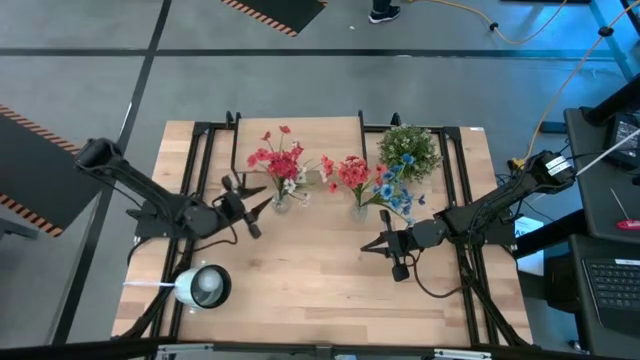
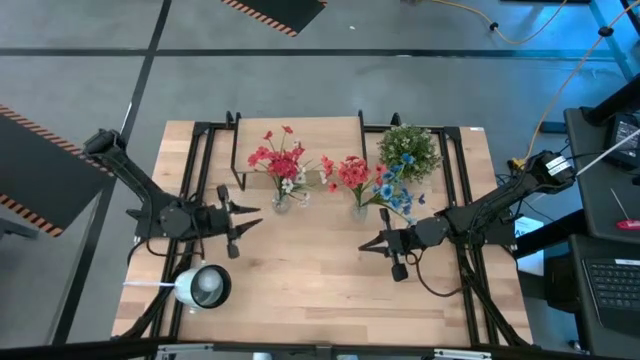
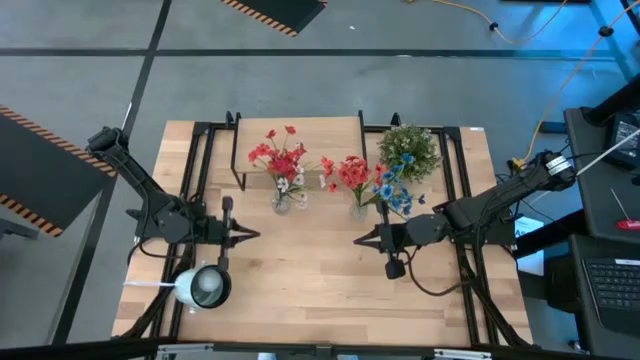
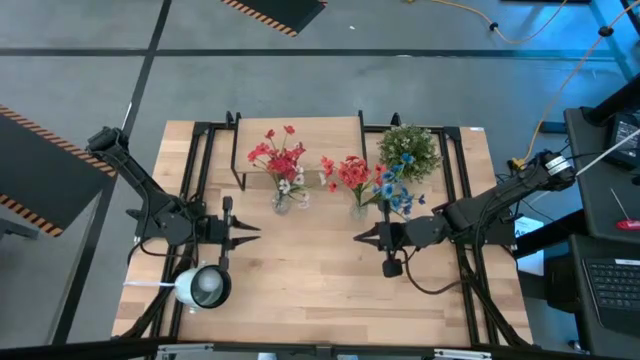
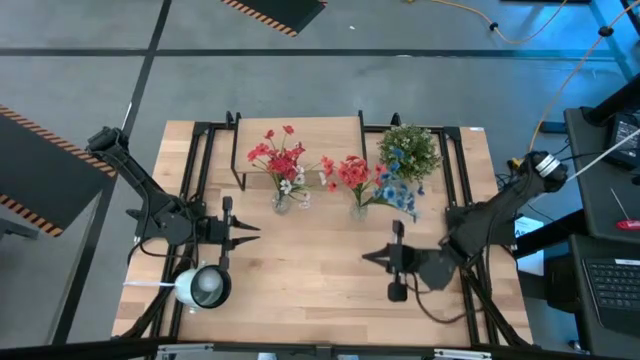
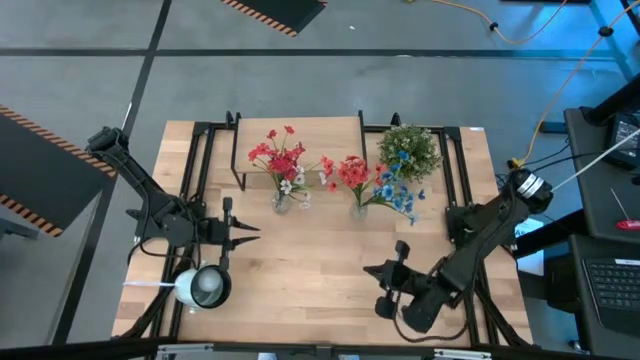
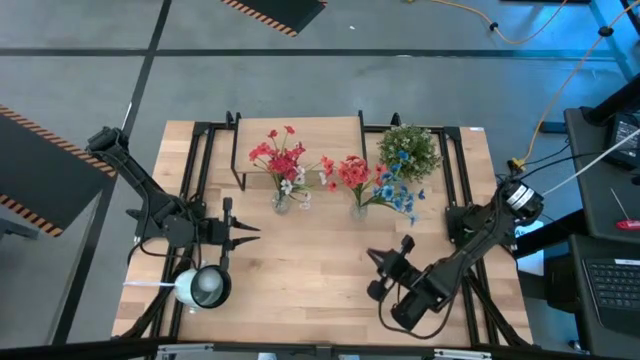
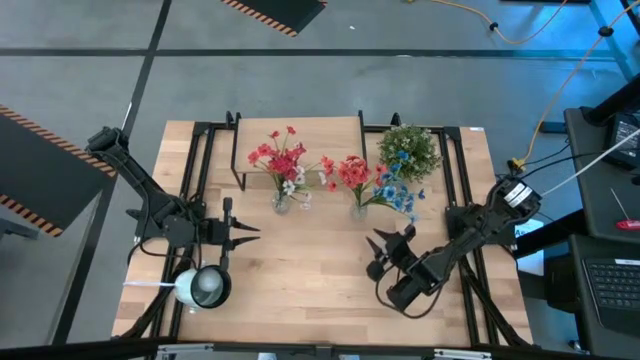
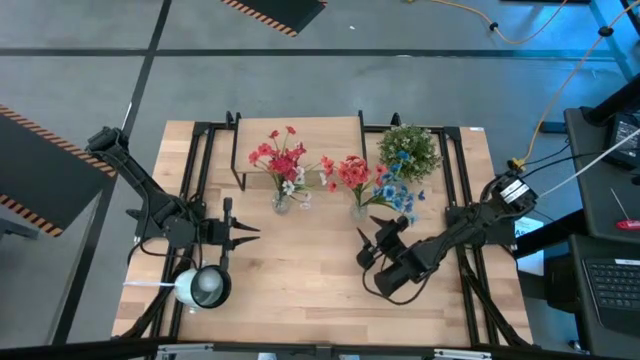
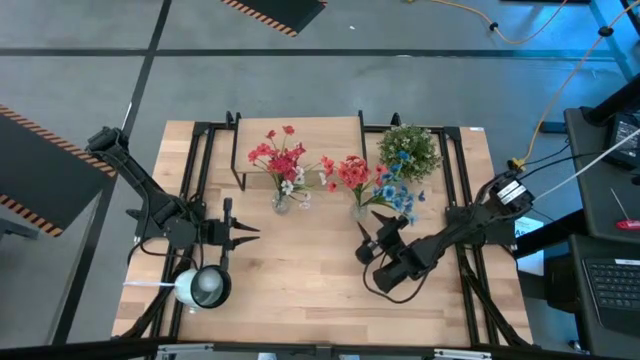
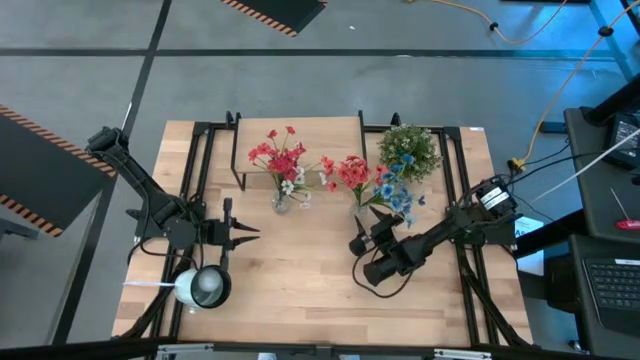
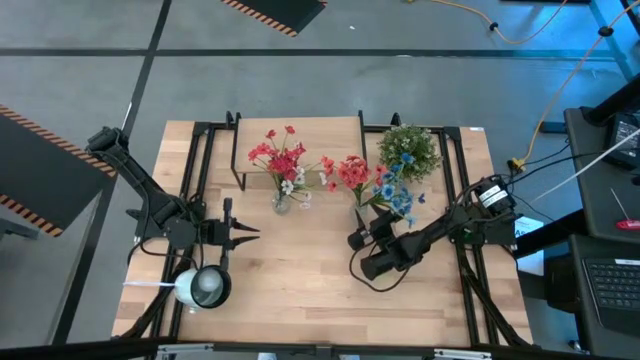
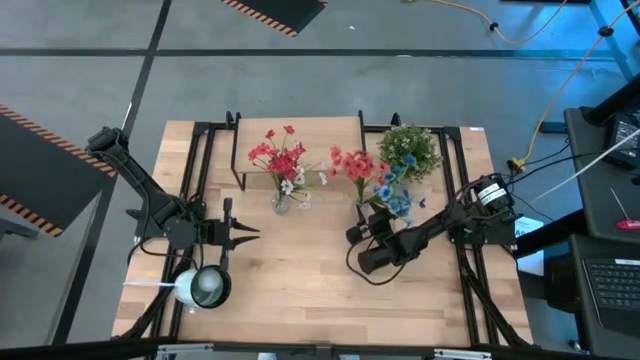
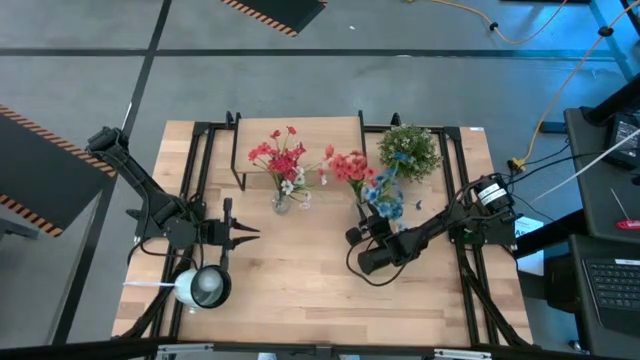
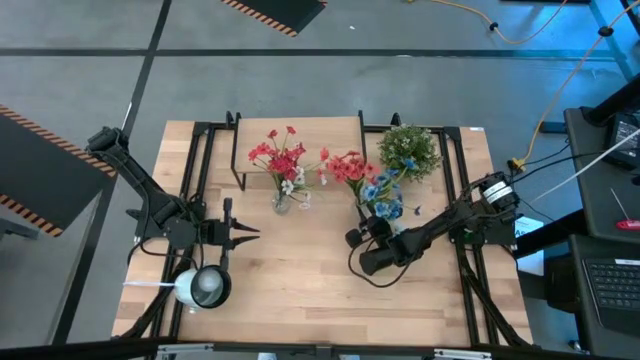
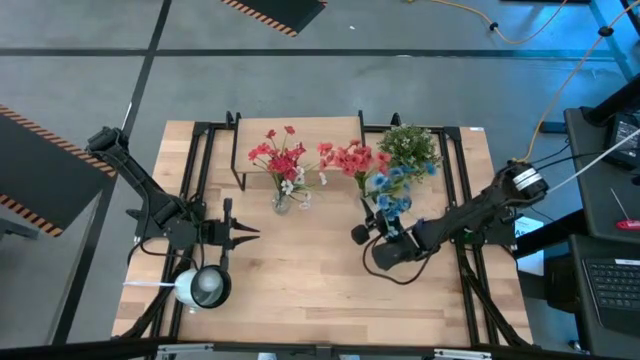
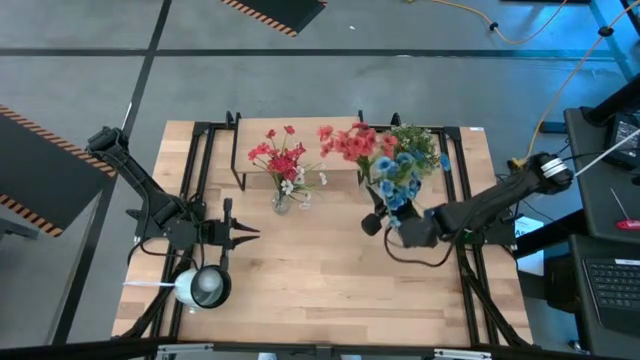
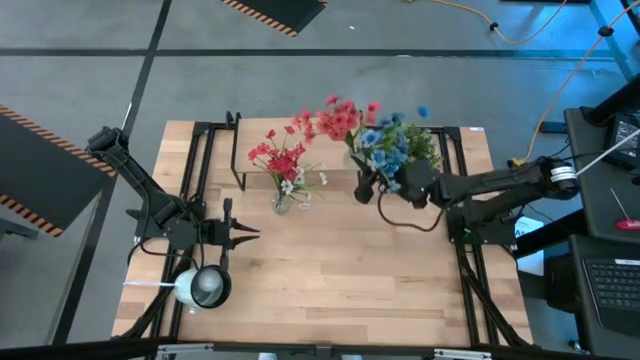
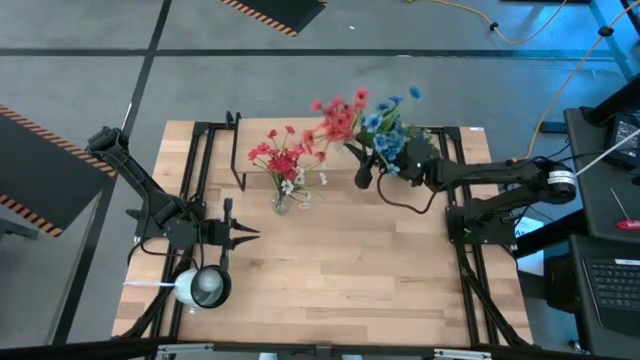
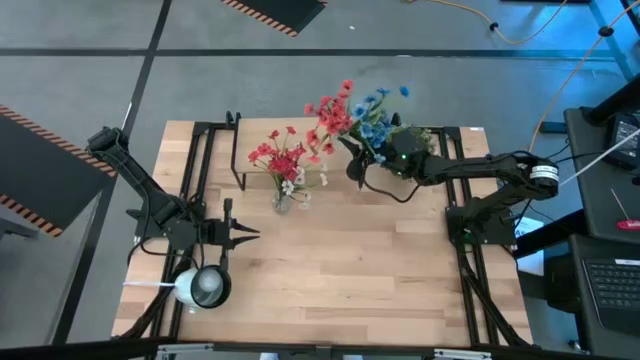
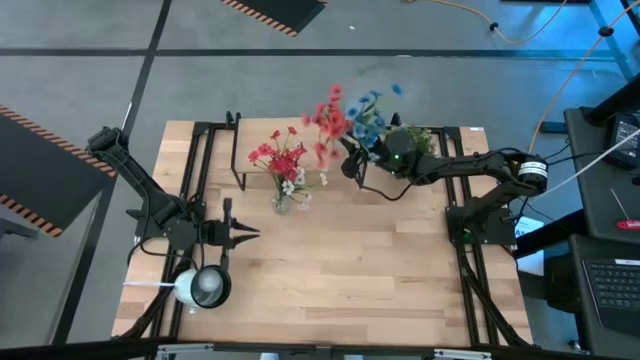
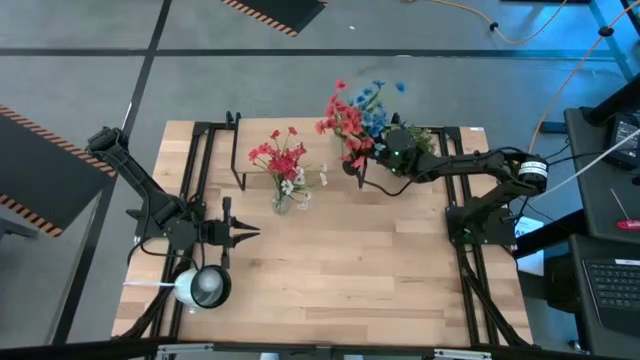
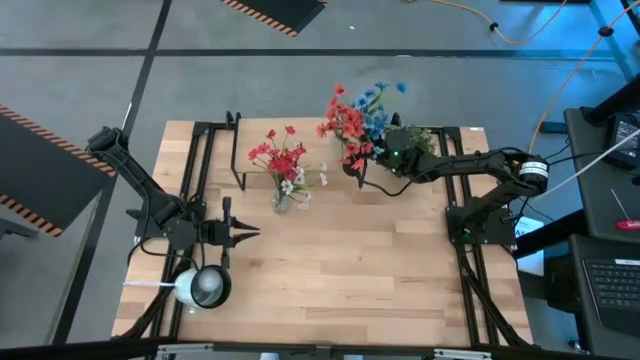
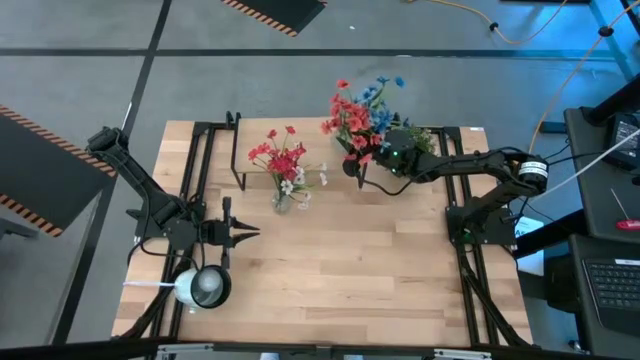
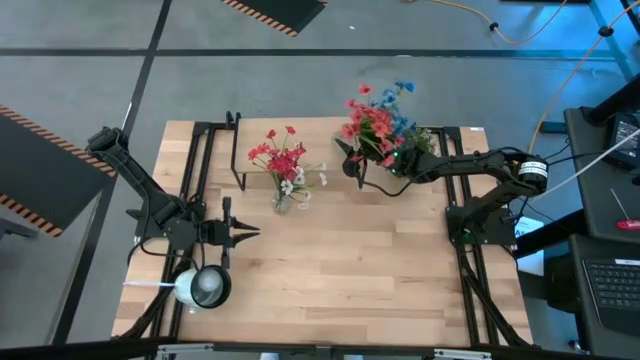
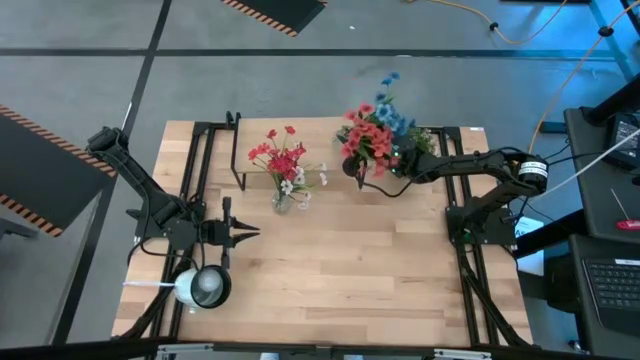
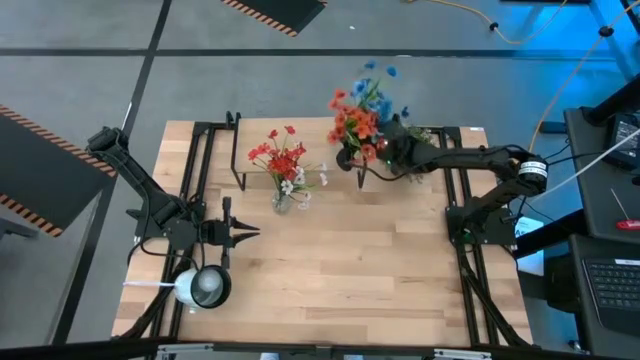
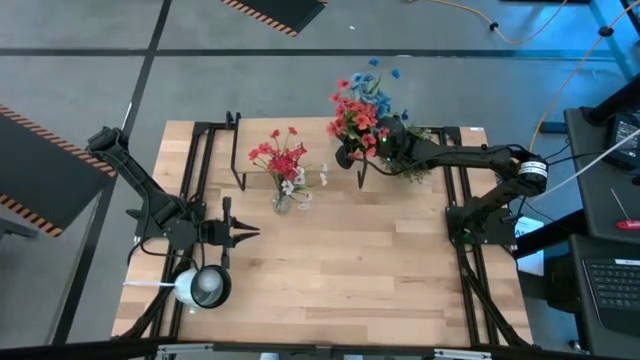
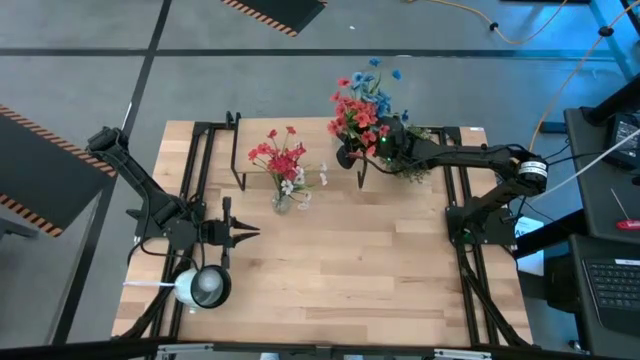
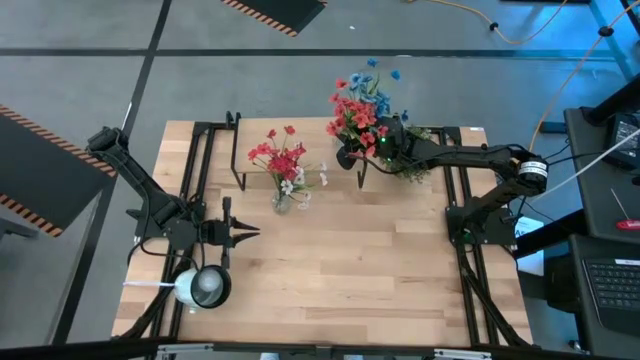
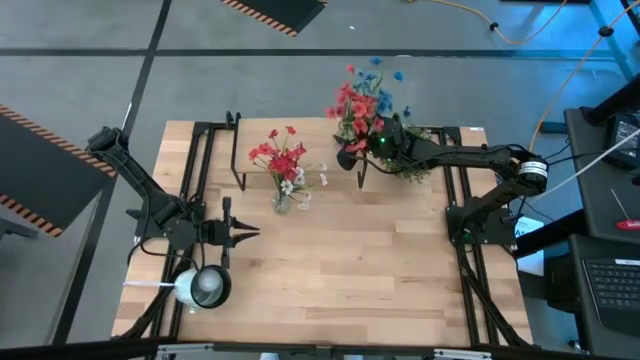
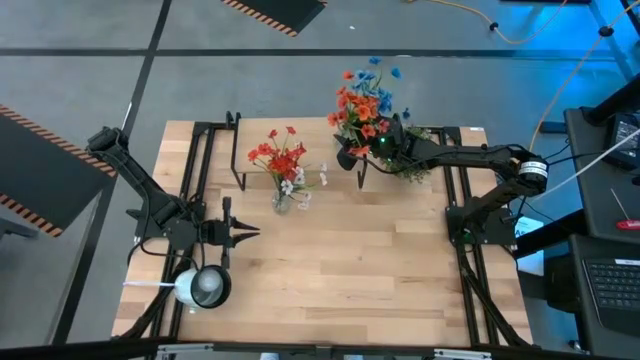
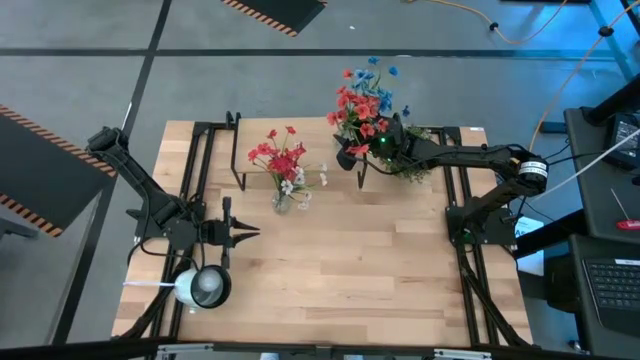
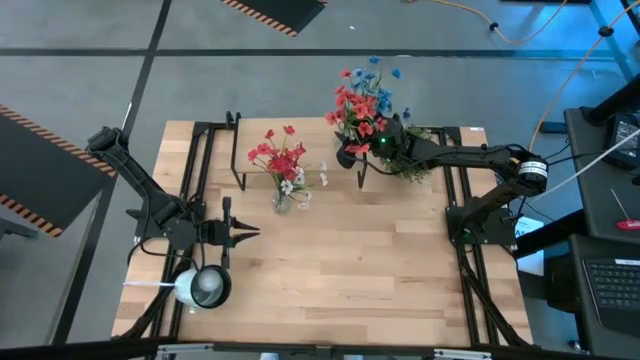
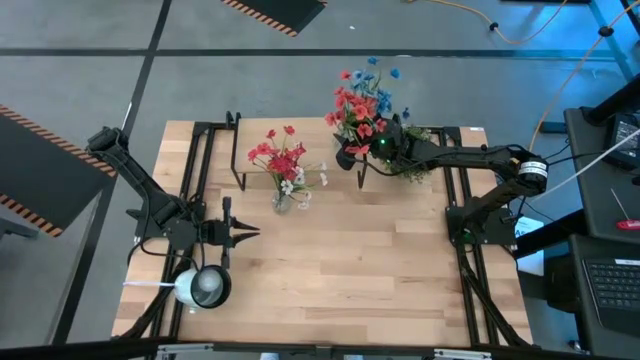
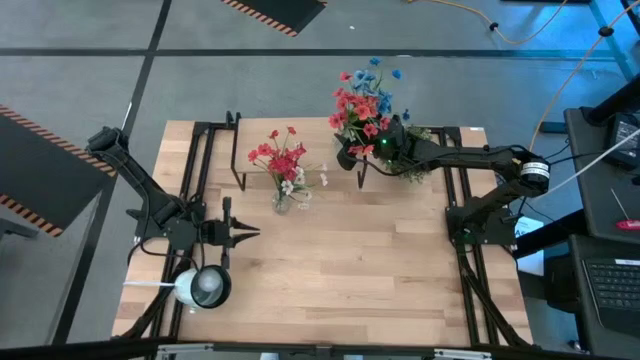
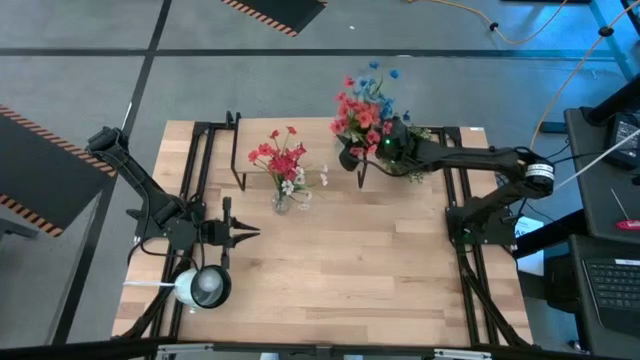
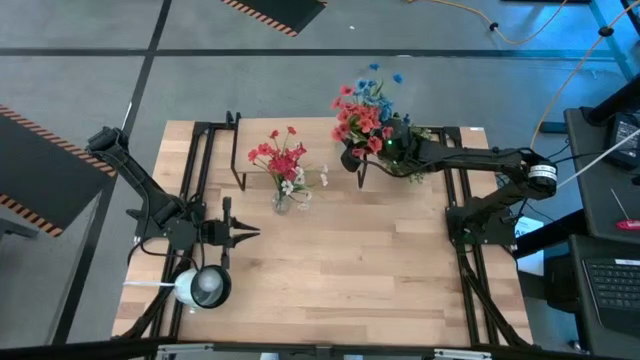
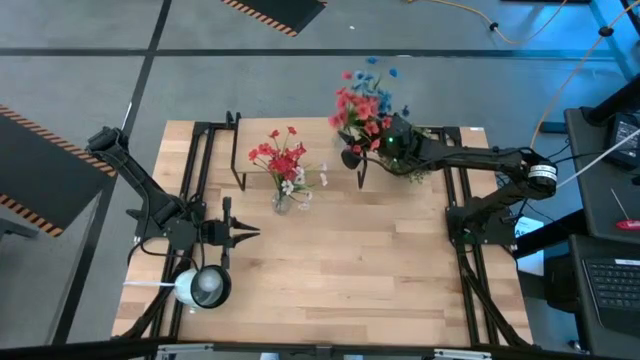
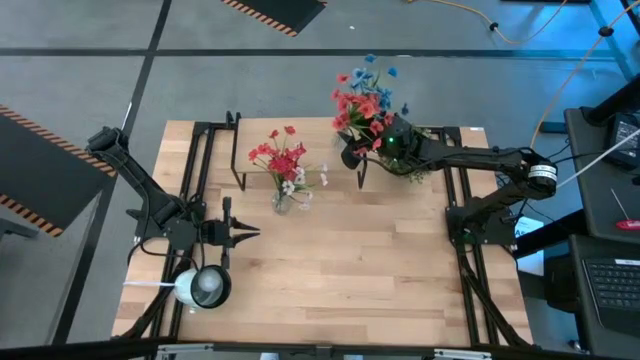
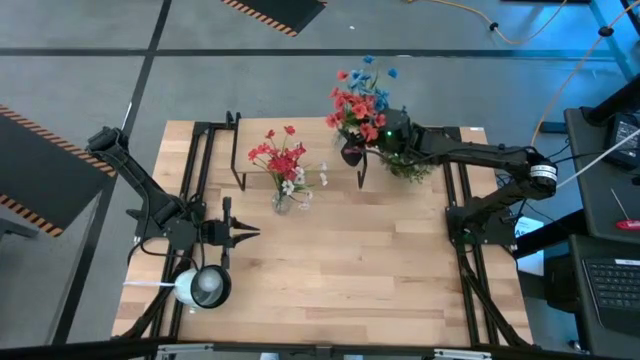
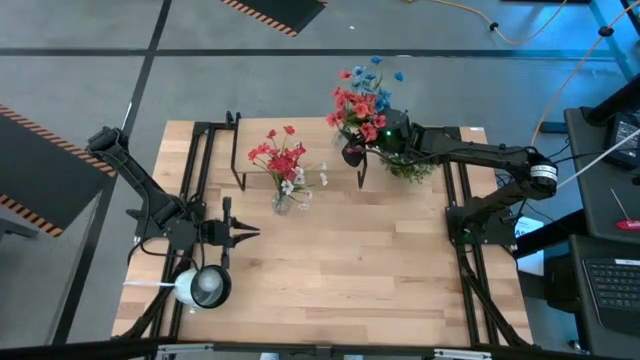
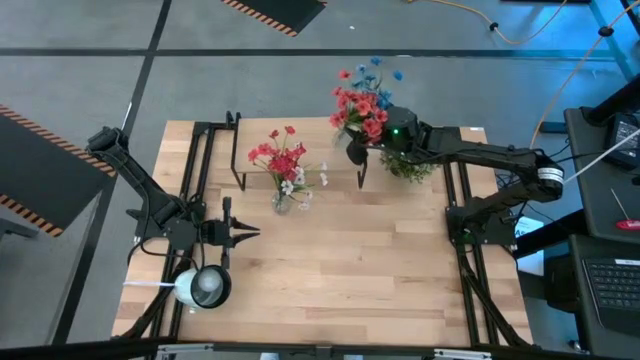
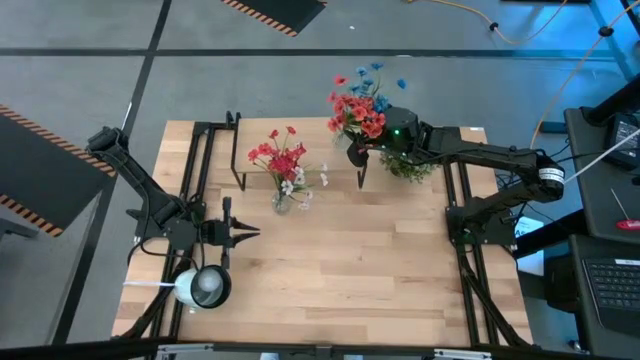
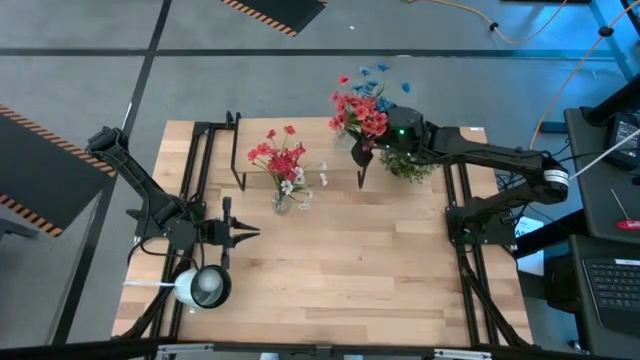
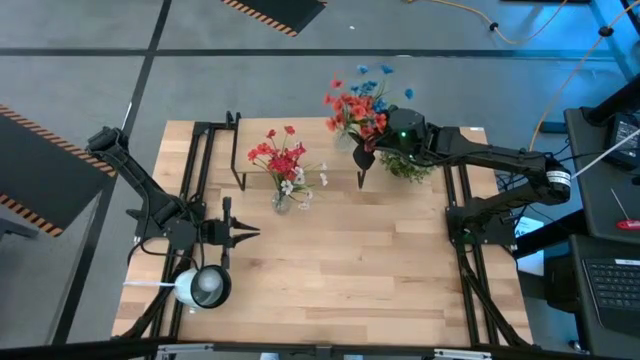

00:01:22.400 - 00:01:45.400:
Task: Pick and place flowers into a vace then onto a shelf
Put the right transparent vase on the shelf
